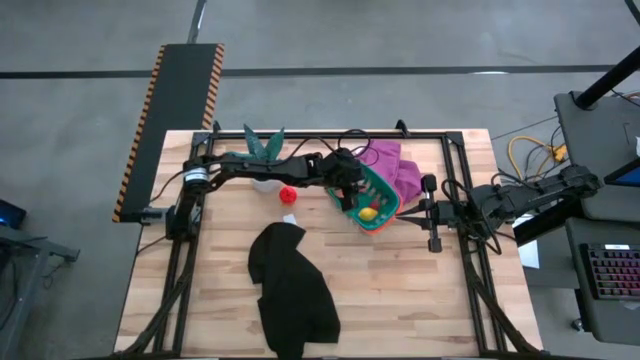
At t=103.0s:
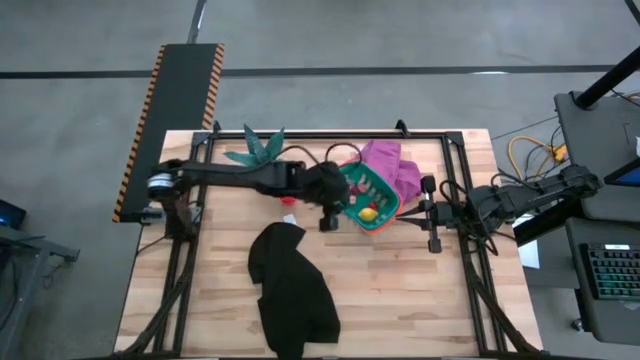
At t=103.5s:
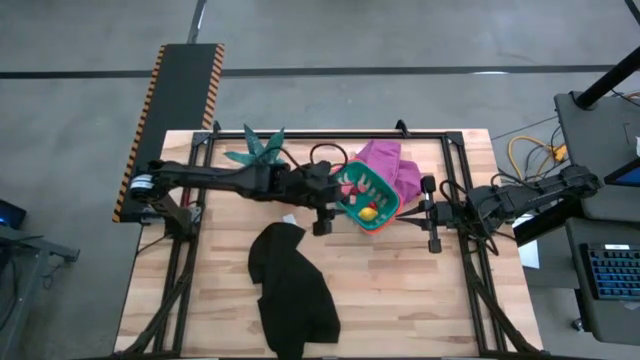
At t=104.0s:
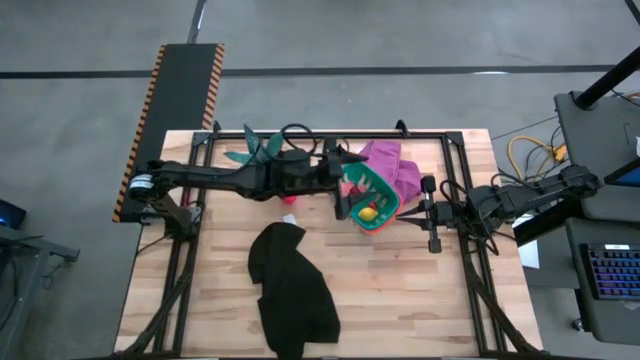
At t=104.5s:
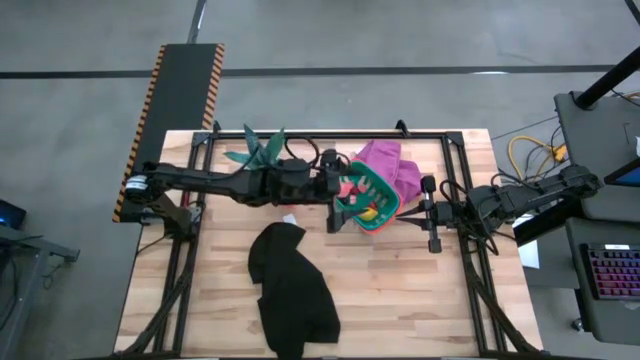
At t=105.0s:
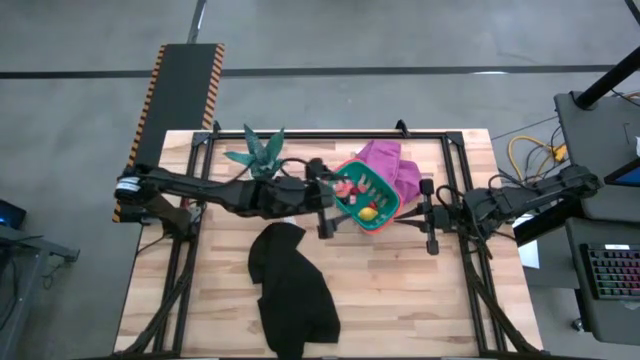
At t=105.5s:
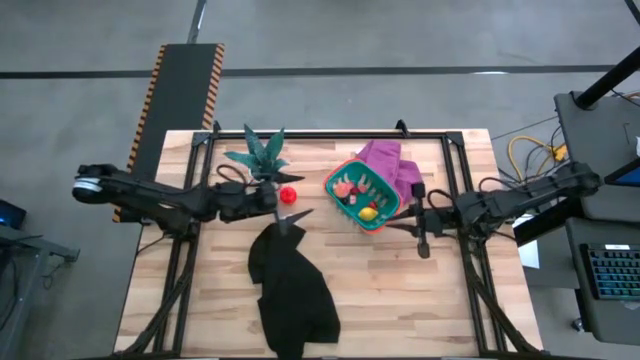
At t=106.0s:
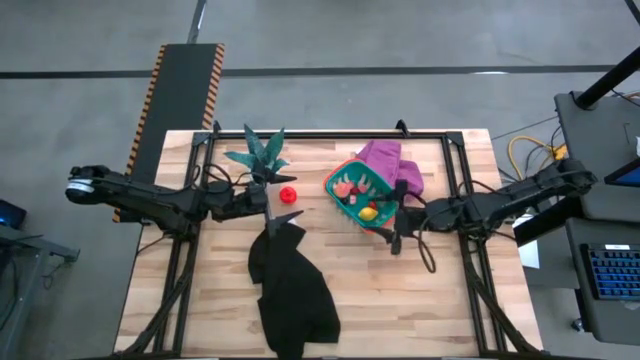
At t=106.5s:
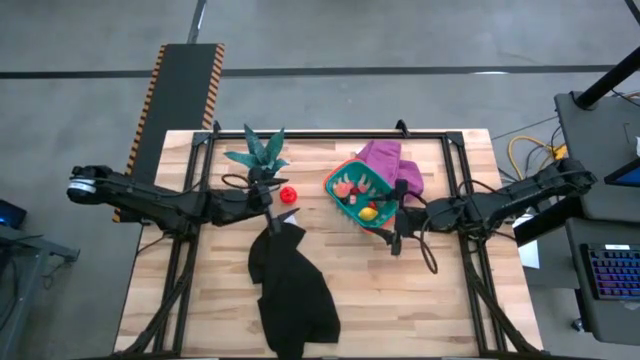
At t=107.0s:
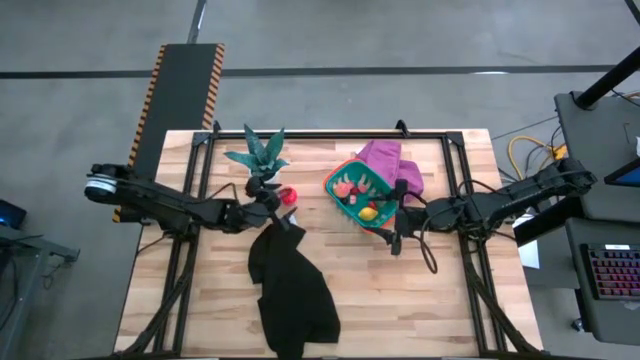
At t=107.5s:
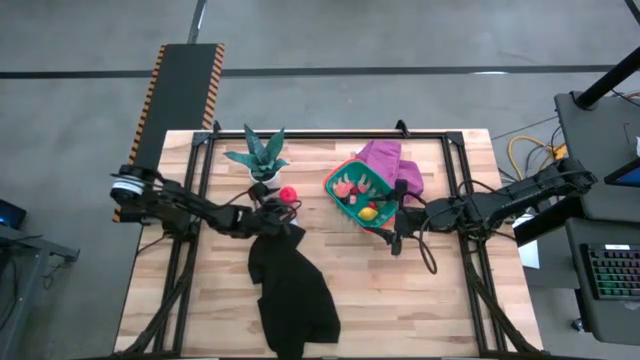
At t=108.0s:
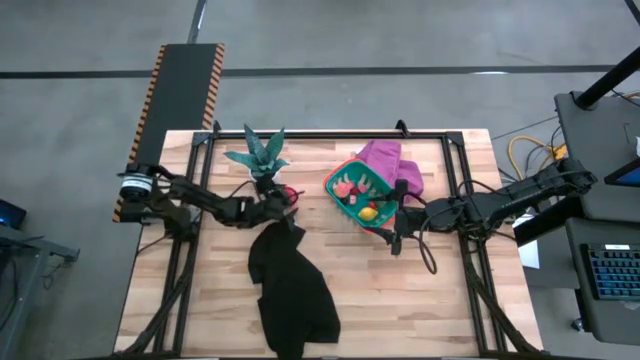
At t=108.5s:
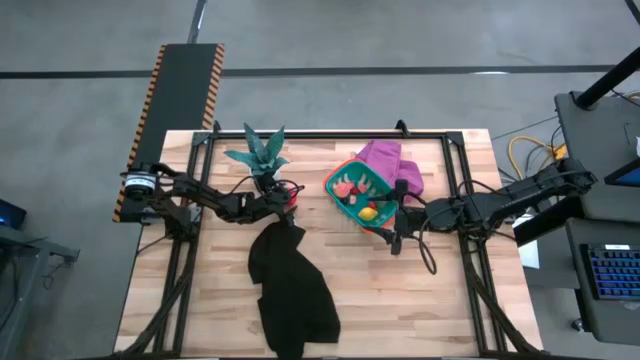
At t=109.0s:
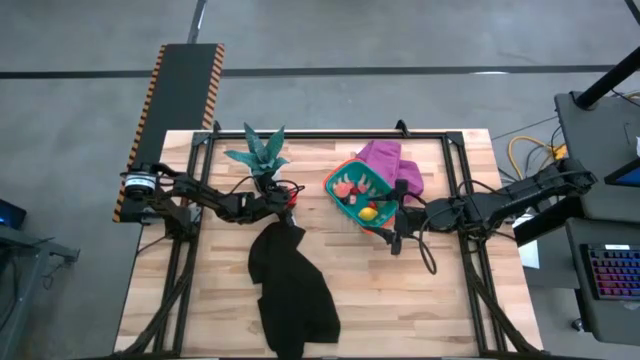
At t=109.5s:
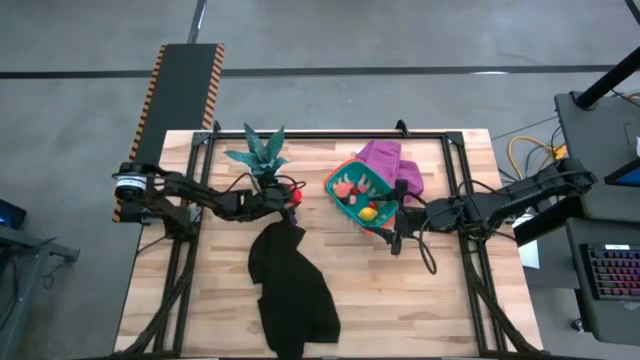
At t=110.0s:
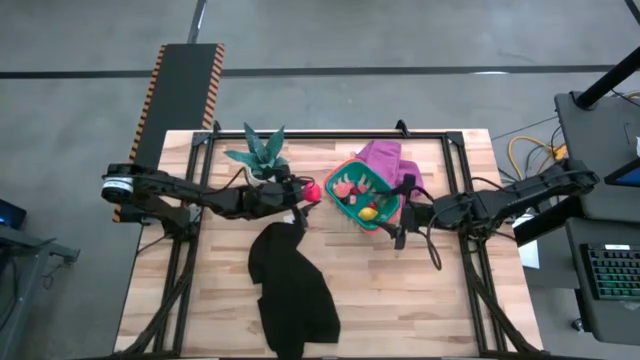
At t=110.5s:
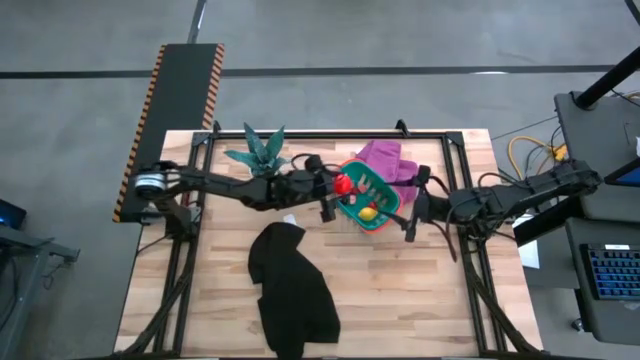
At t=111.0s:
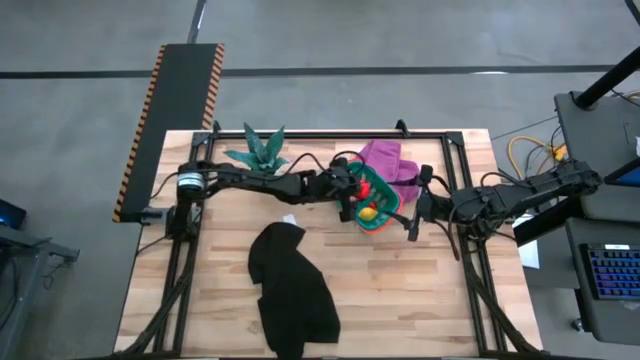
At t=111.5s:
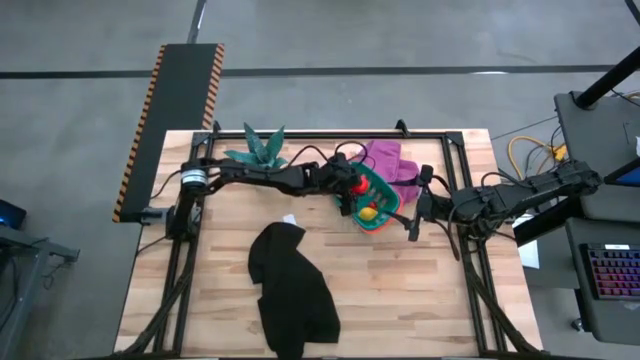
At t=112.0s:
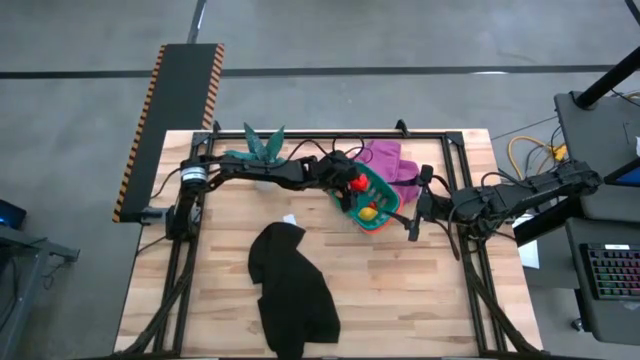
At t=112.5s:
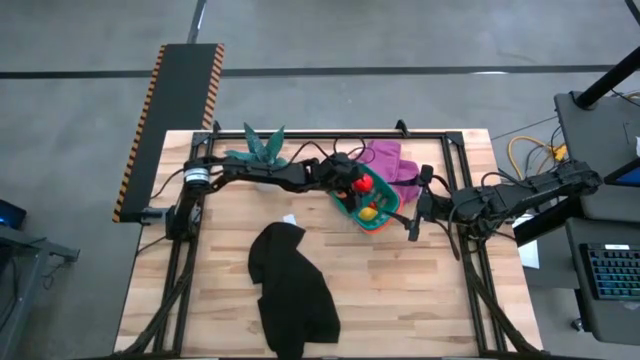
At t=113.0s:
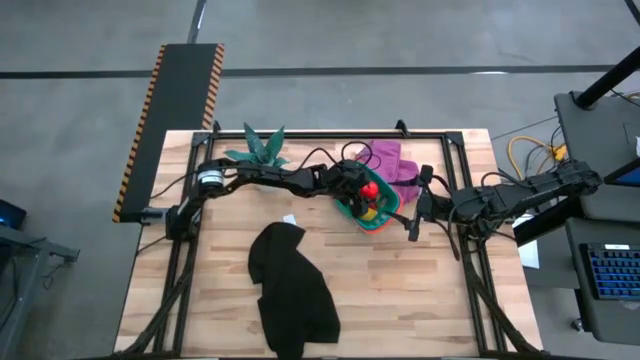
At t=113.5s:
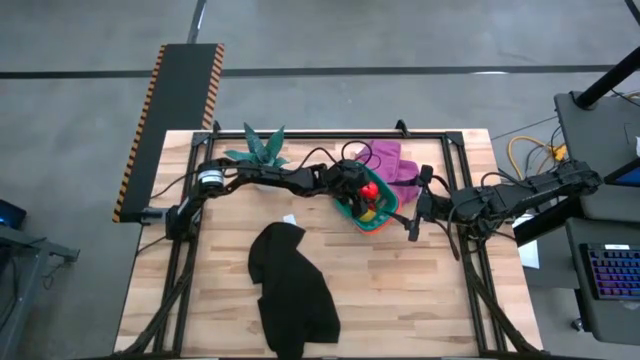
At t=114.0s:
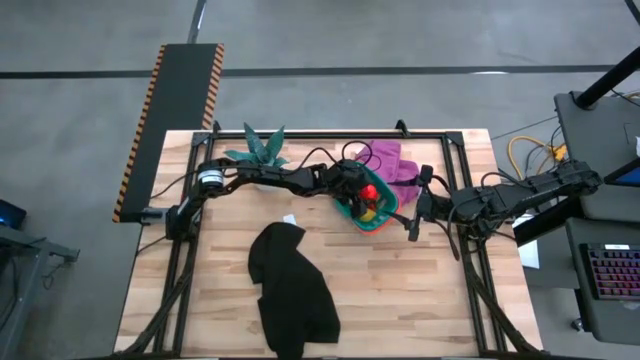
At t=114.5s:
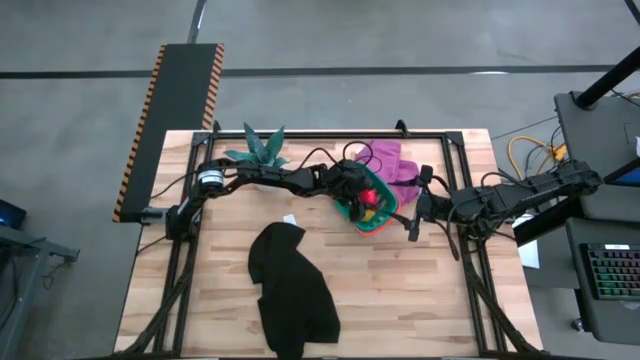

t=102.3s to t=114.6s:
Task: Pick and placing Produce into tupperware
Put the apple into the green basket

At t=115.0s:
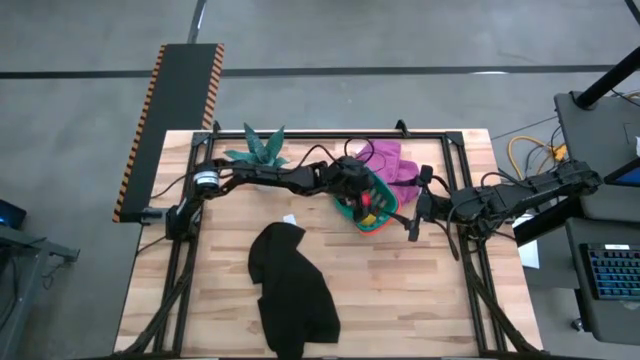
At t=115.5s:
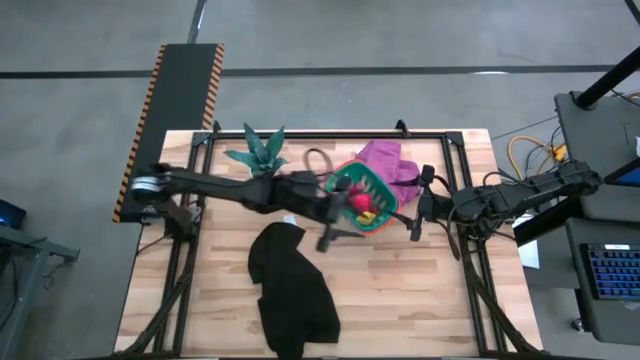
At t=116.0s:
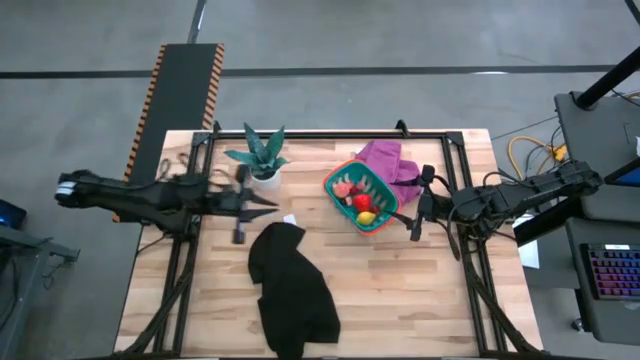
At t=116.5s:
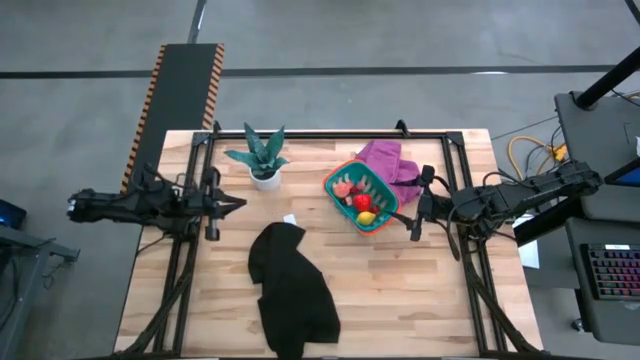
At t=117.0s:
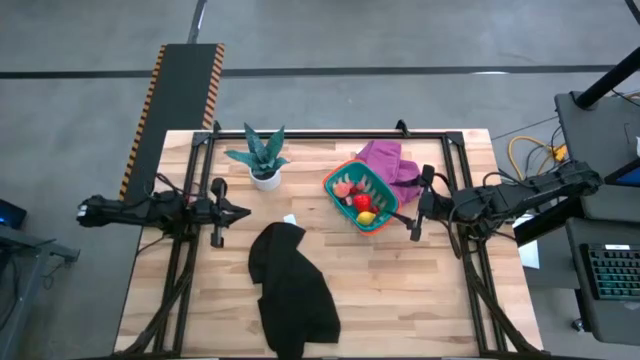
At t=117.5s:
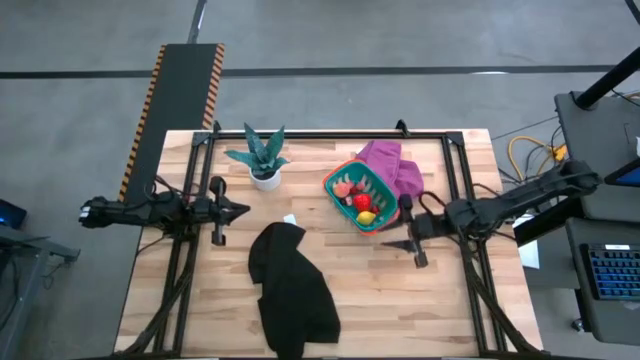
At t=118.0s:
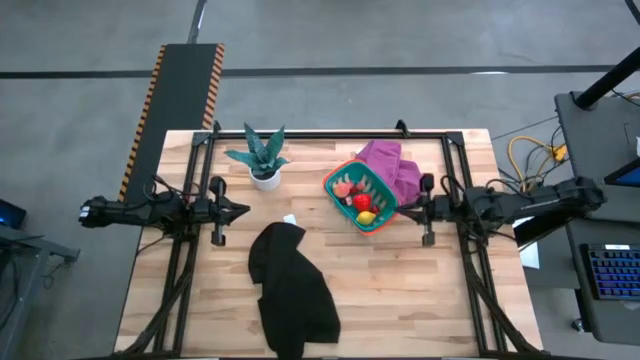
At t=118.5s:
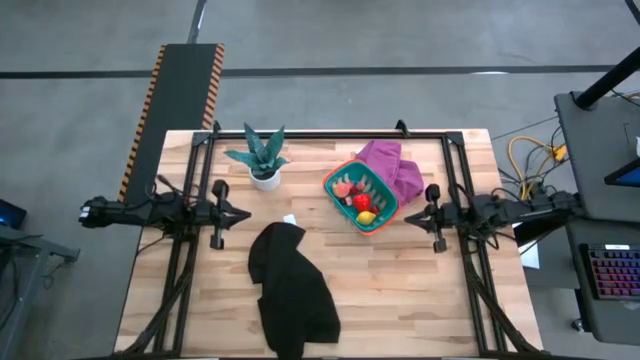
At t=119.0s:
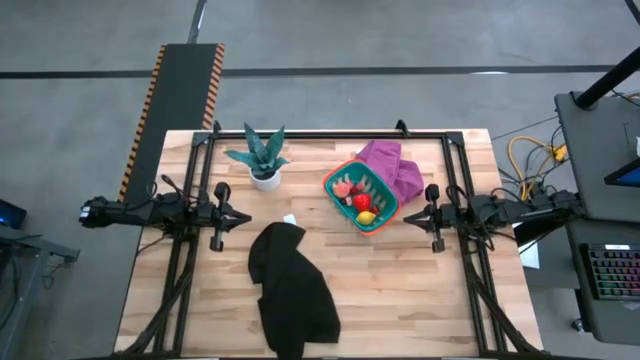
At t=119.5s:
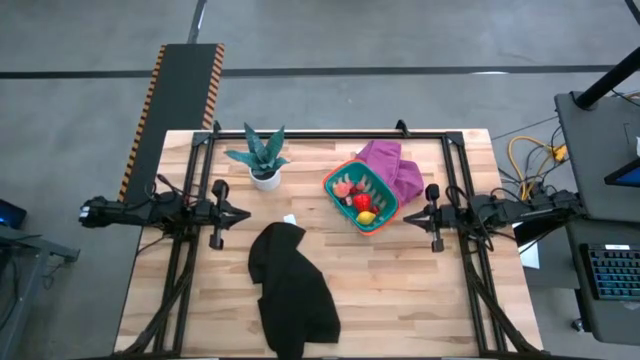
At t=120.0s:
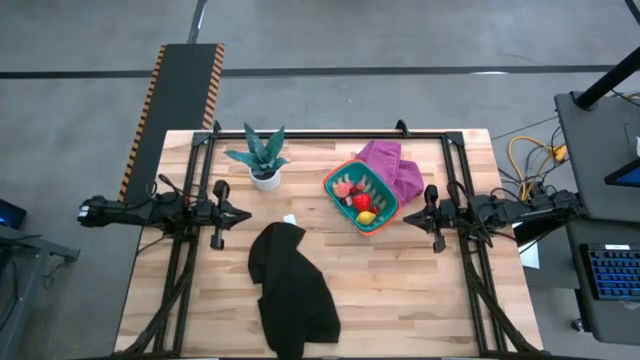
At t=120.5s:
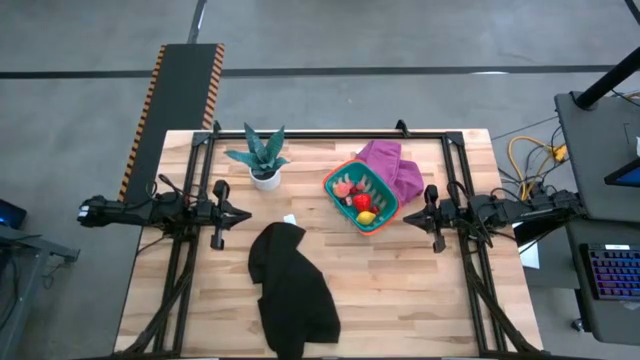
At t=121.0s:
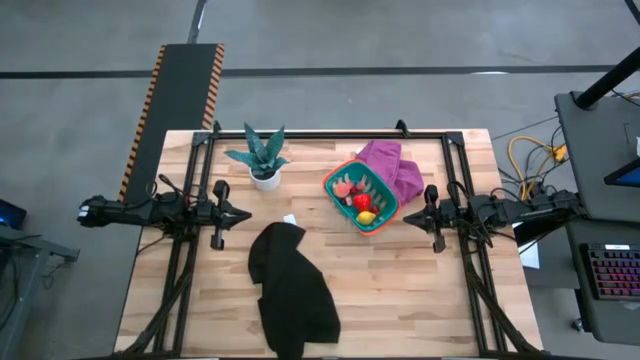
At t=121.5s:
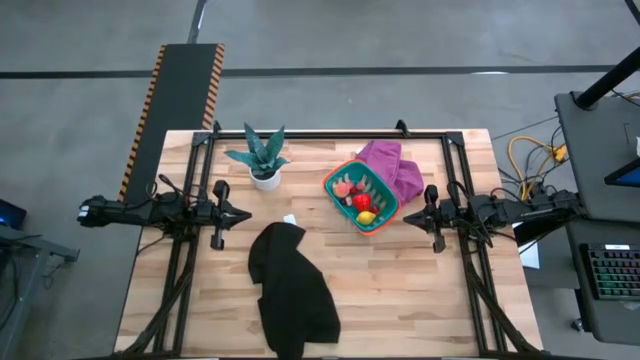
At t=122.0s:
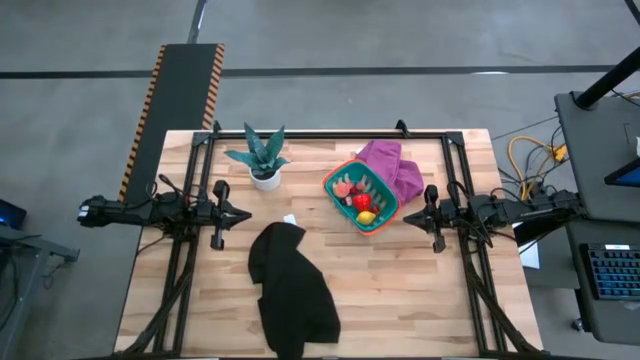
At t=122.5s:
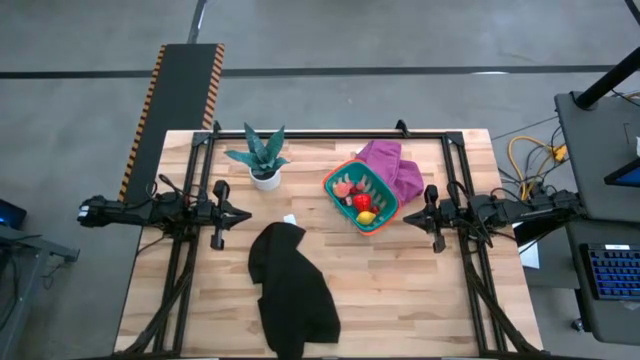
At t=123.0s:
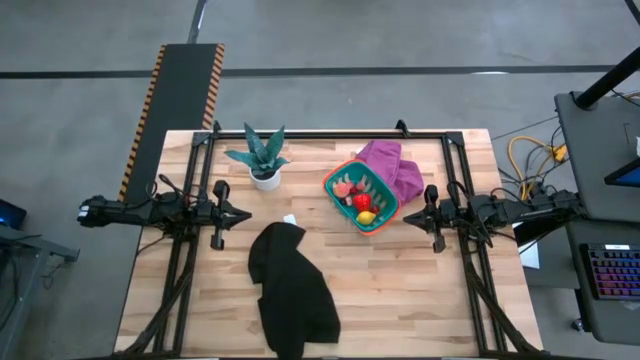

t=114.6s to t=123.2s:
Return to Home Position
